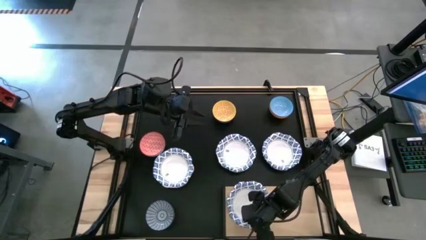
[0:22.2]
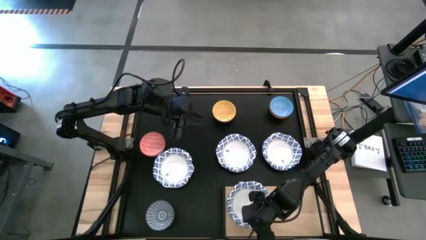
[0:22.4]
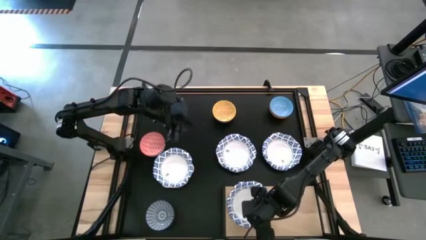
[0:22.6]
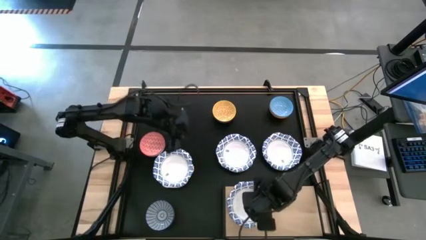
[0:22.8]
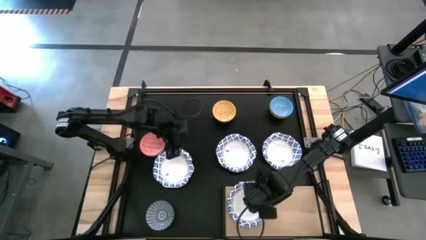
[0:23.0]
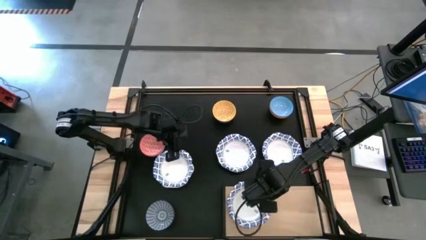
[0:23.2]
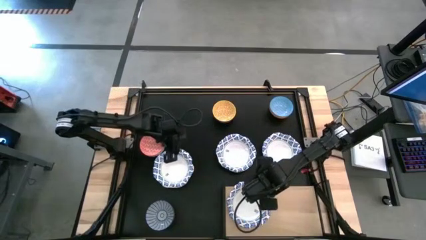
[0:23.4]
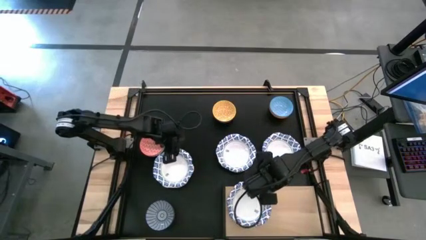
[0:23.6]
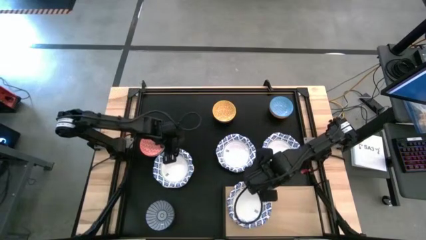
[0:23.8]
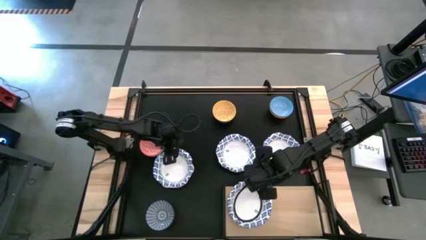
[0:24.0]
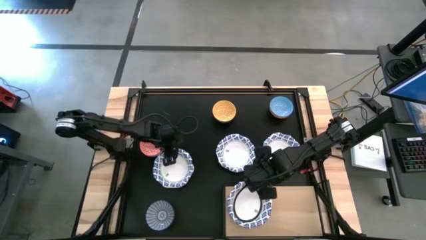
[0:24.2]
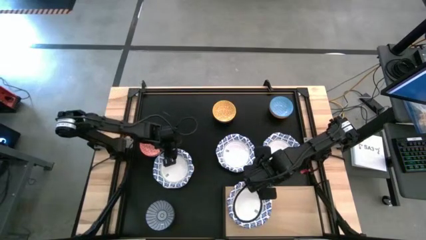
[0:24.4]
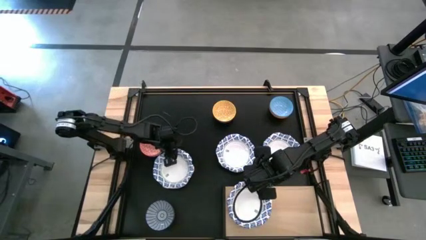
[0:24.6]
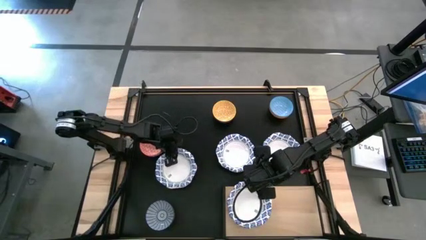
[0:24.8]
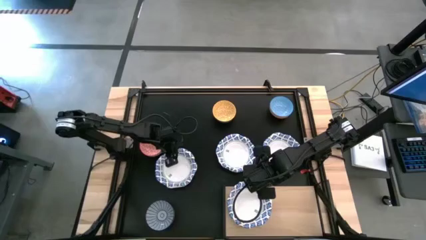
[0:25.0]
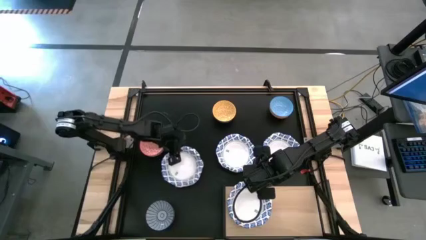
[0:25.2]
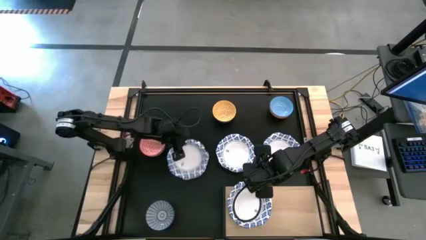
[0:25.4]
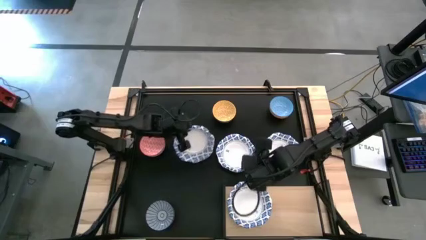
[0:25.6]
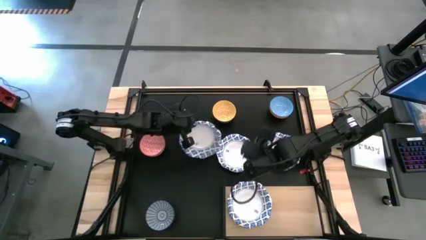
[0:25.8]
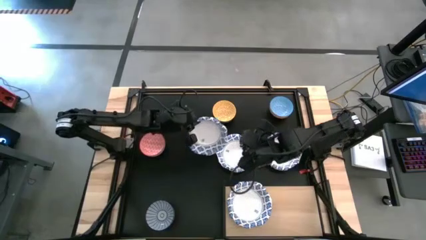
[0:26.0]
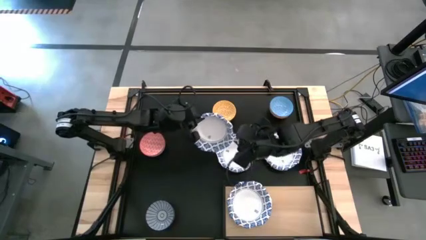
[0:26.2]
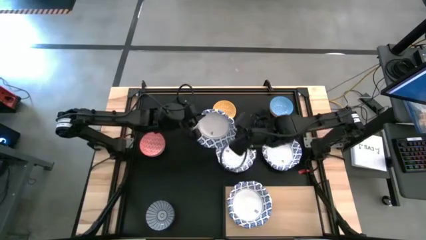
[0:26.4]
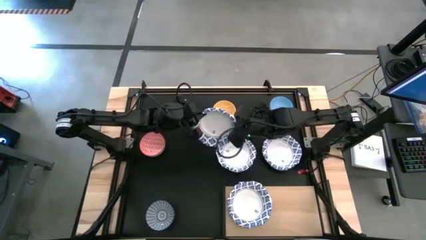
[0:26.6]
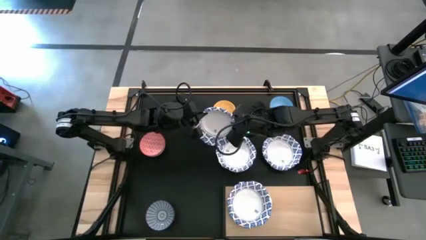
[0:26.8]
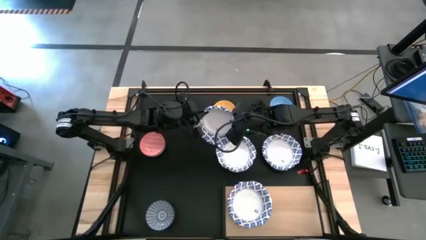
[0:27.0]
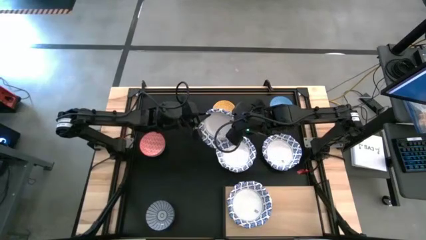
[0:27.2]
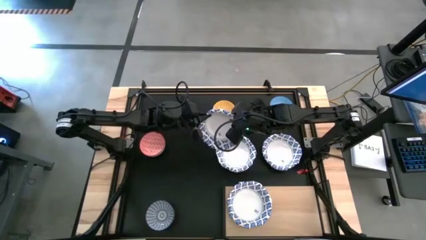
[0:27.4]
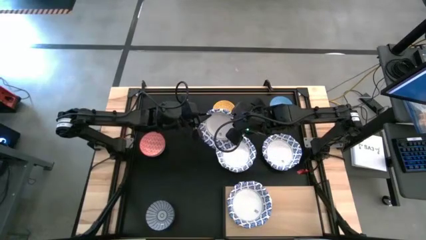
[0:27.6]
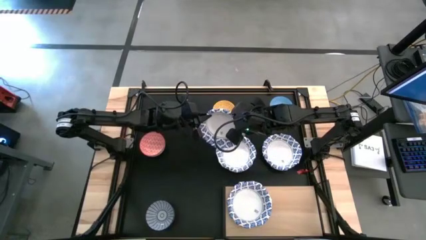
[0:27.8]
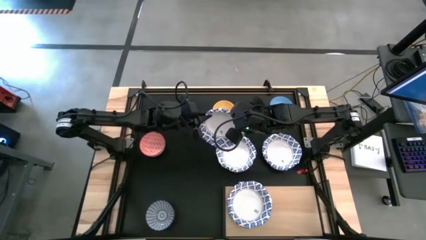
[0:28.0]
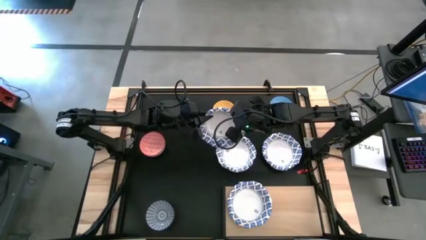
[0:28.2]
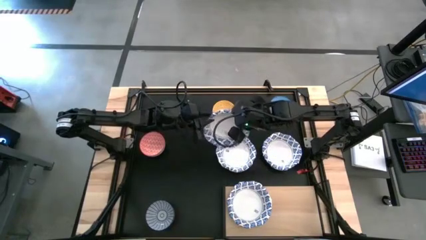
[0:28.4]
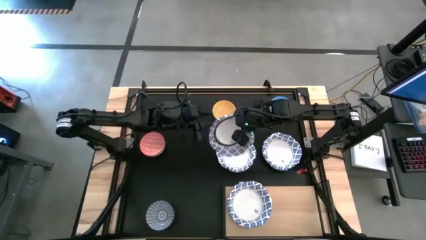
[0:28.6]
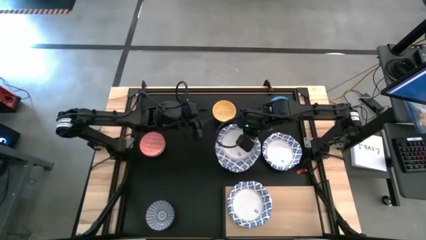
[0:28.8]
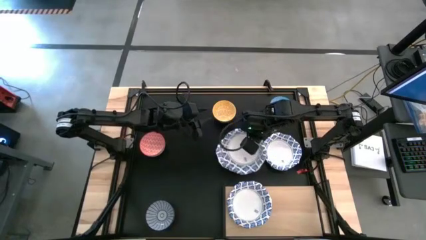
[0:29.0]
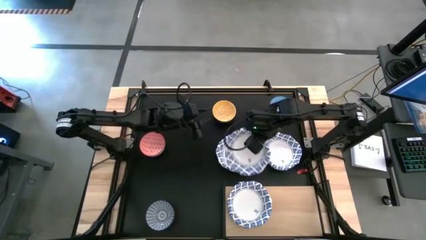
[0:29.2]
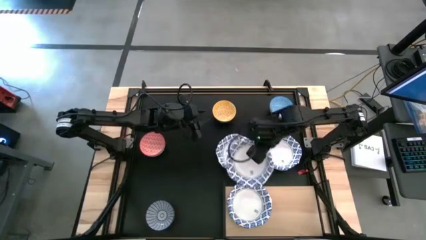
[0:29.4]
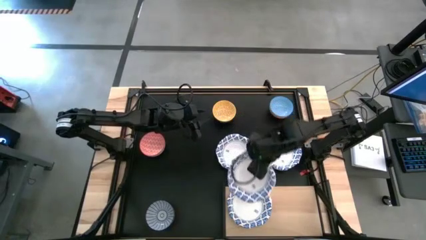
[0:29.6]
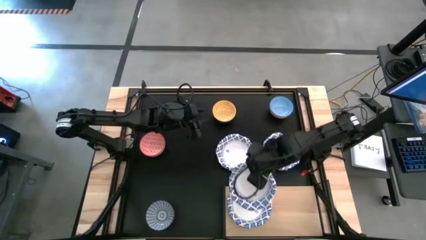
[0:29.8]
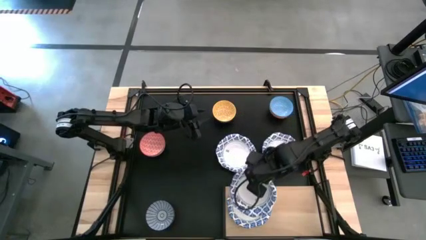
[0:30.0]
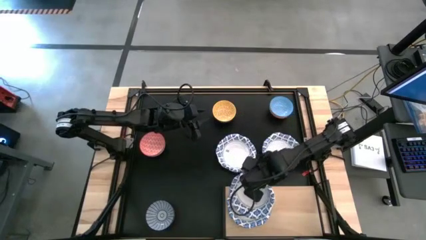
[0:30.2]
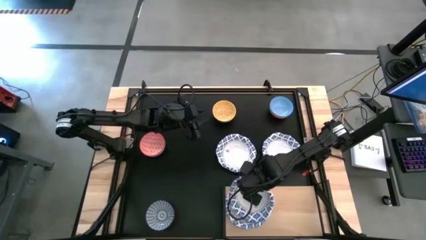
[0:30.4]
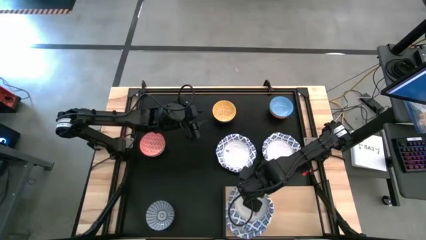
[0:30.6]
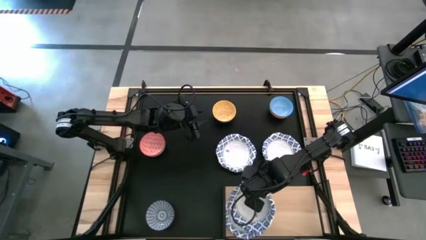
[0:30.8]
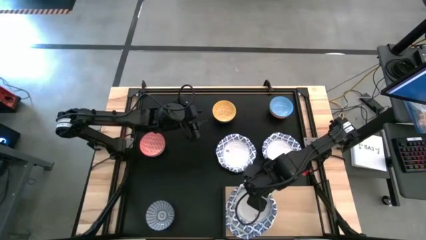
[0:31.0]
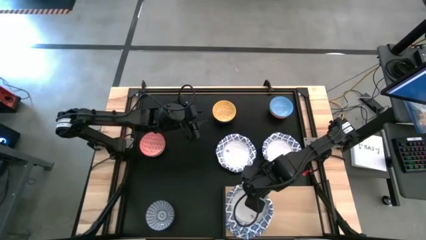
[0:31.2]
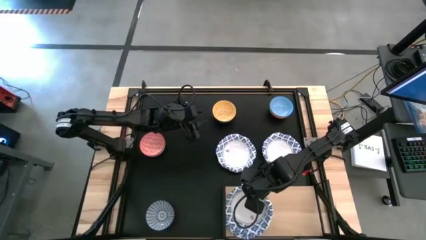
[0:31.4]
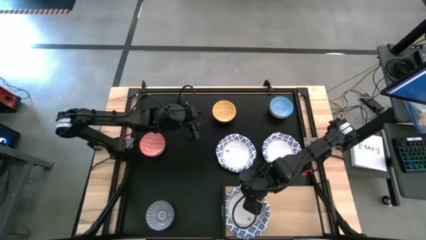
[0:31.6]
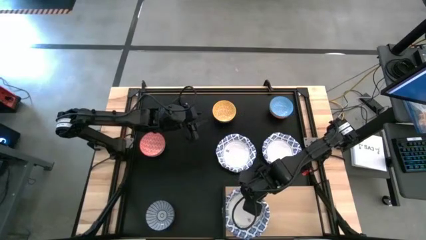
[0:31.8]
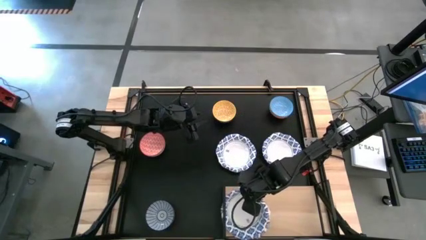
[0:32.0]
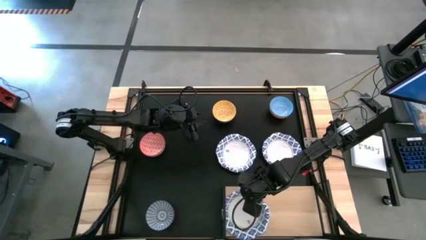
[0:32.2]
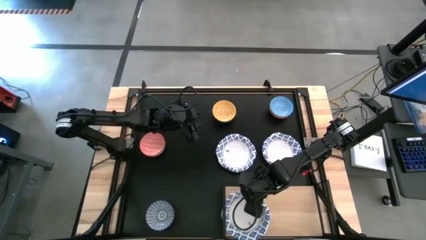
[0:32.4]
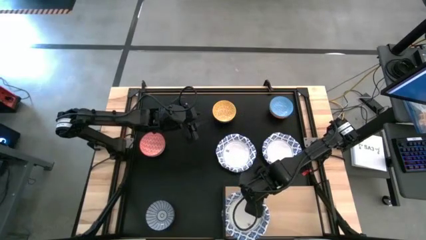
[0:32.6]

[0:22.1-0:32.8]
Task: Place and stack bowls onto a shelf
Stack the left white patterned bowl on top of the other white patterned bowl on the shelf

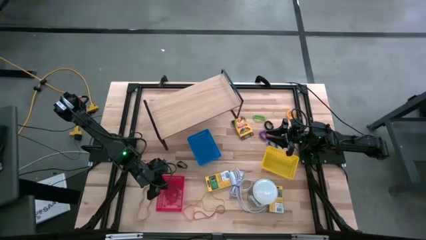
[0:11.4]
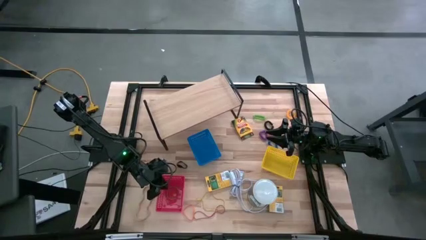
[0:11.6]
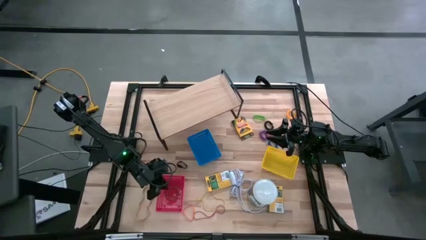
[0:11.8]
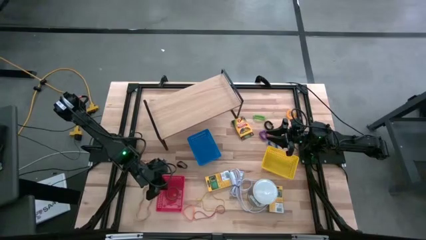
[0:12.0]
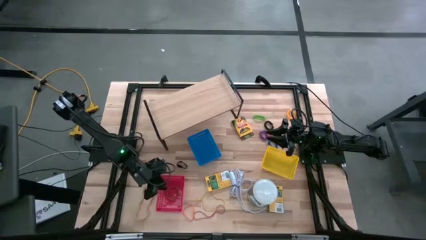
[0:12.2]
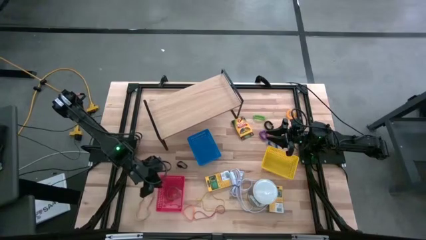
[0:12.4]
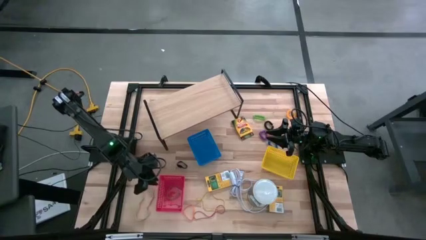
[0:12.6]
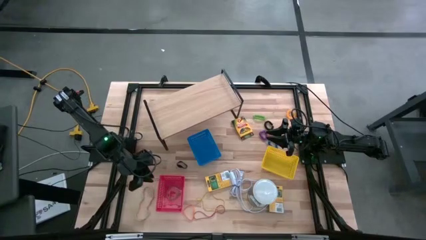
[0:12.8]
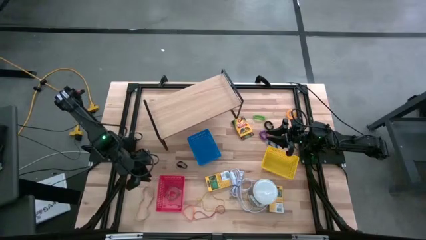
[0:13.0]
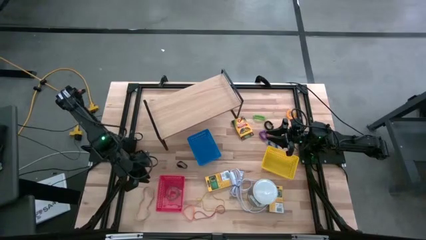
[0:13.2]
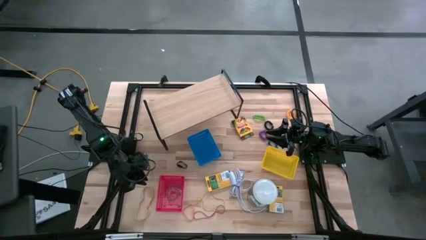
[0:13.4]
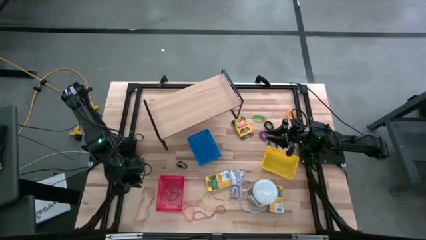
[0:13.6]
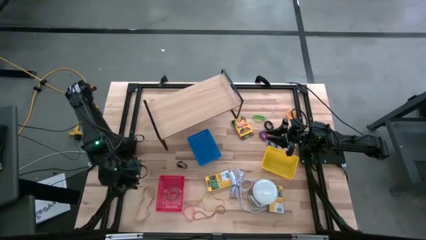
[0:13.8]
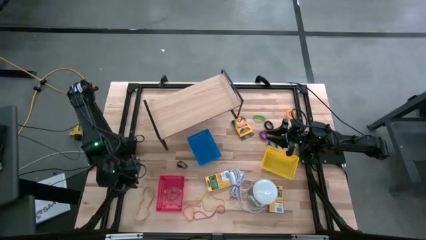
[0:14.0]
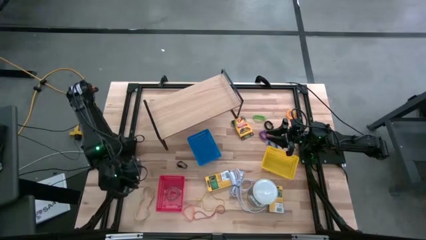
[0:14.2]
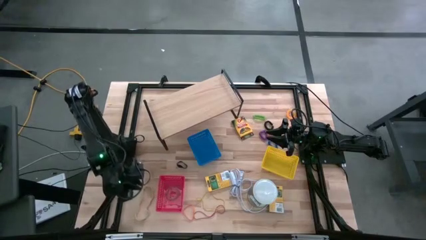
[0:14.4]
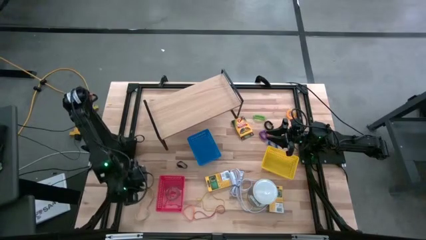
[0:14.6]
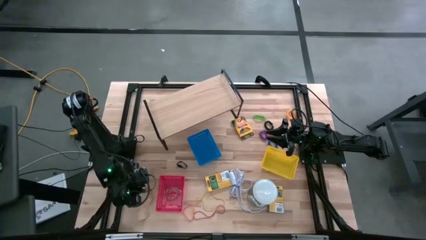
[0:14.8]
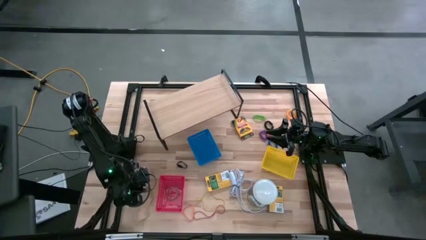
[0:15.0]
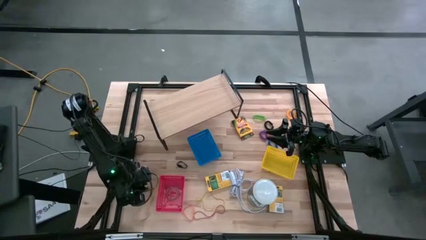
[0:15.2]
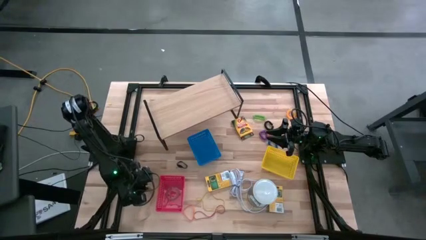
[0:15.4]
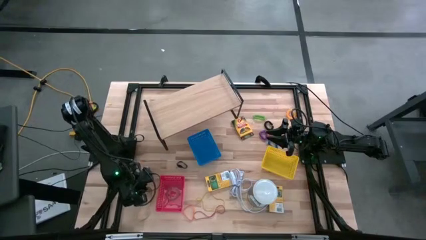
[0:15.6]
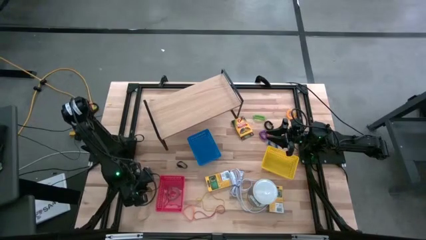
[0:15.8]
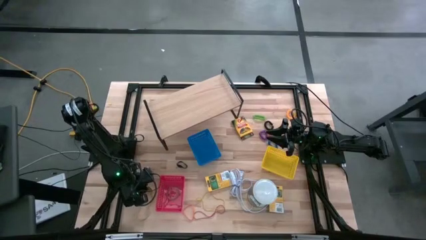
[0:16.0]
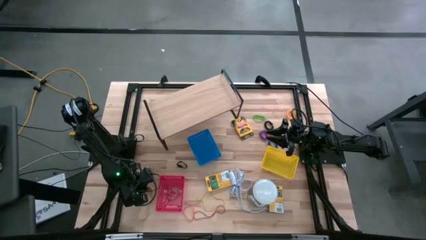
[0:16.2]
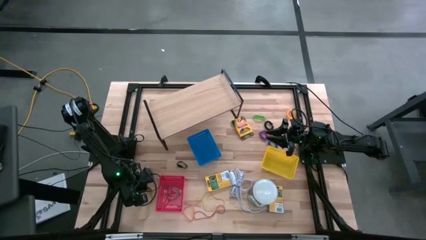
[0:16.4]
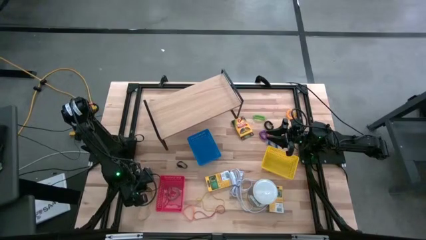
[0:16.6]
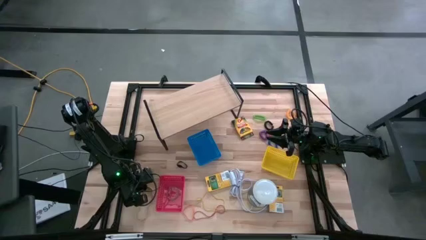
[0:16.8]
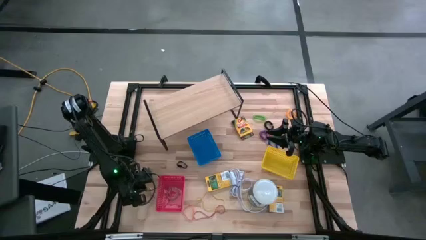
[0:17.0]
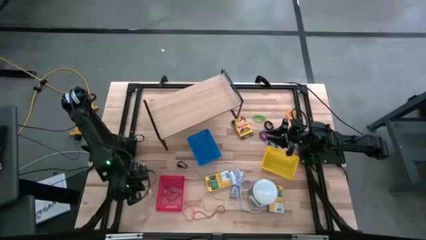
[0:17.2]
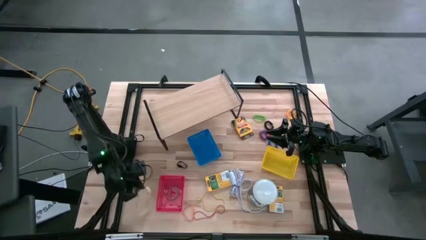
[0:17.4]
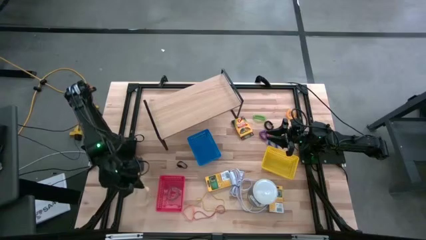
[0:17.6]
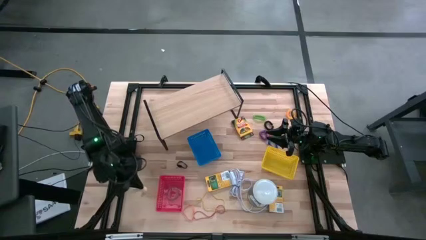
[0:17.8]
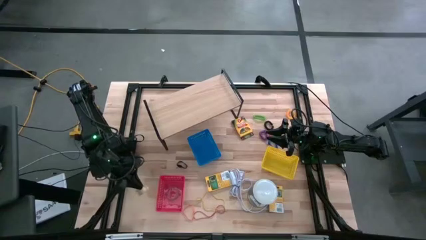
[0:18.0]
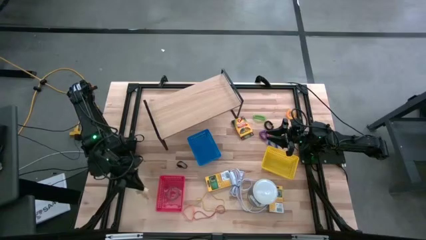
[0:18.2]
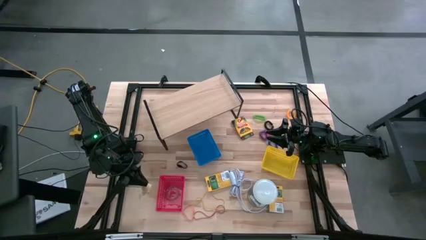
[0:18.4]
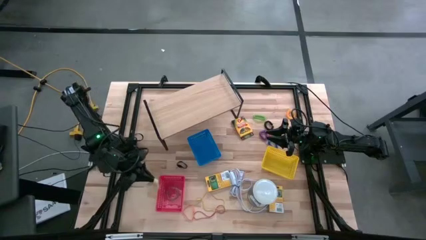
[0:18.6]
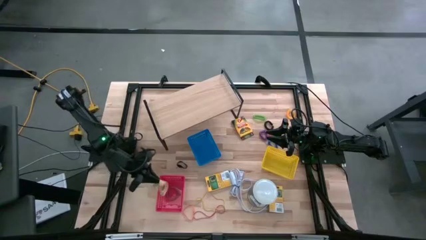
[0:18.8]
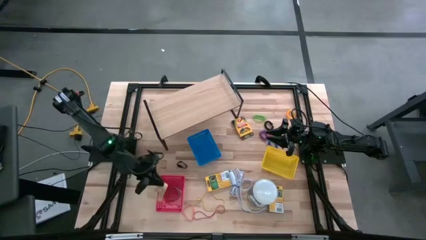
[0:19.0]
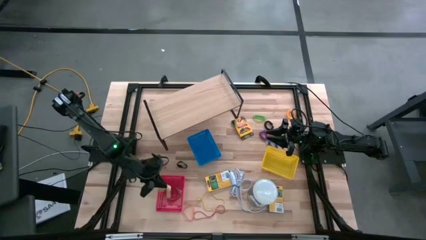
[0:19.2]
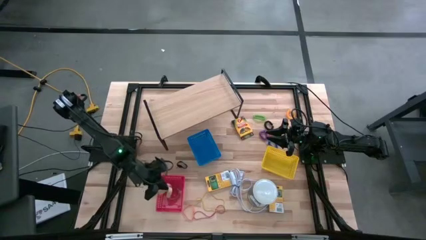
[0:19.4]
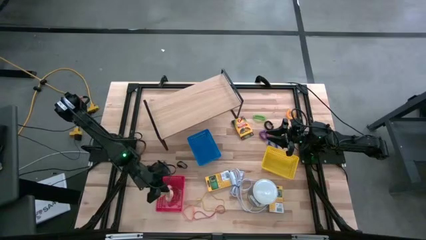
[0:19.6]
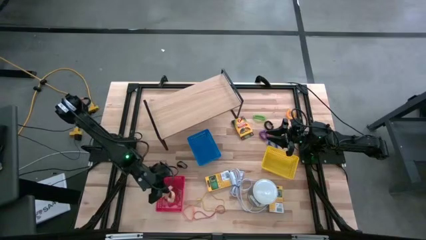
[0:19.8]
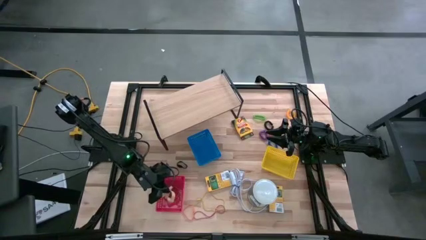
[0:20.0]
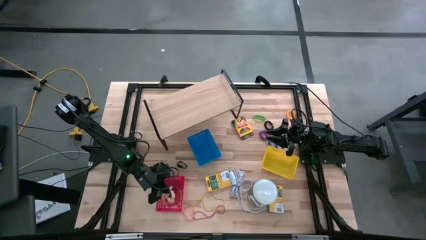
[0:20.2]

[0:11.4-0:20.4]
Task: Pick & Place Office Desk Supplies
Put the brown rubber band into the red bin
